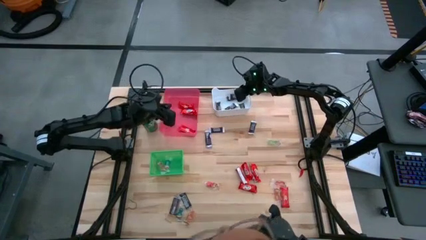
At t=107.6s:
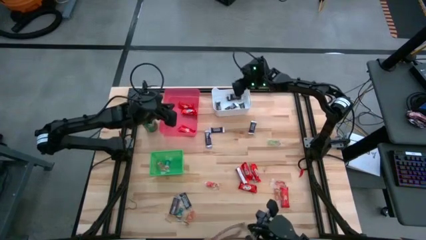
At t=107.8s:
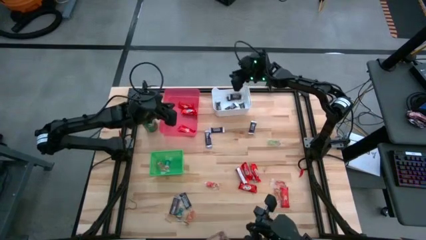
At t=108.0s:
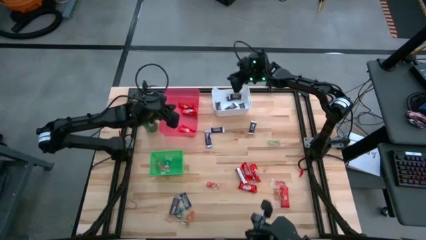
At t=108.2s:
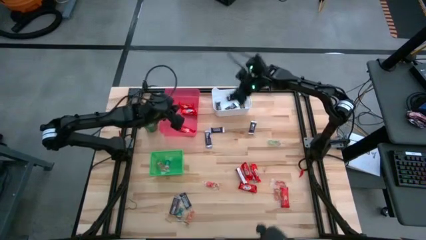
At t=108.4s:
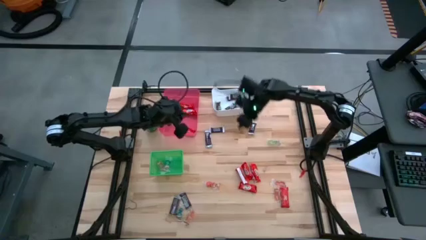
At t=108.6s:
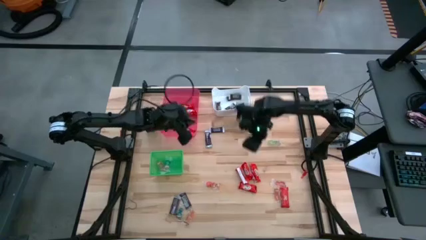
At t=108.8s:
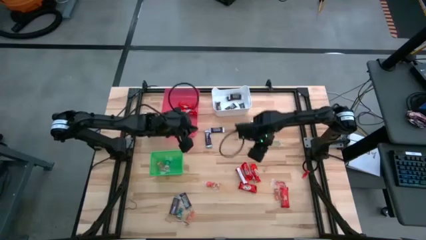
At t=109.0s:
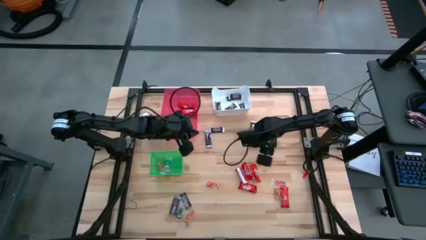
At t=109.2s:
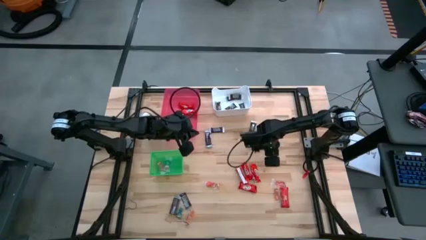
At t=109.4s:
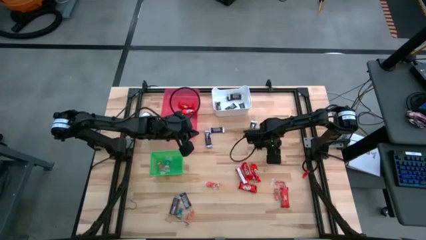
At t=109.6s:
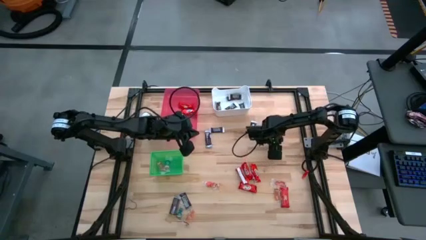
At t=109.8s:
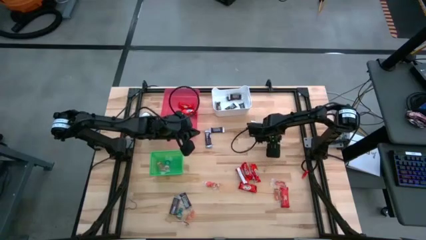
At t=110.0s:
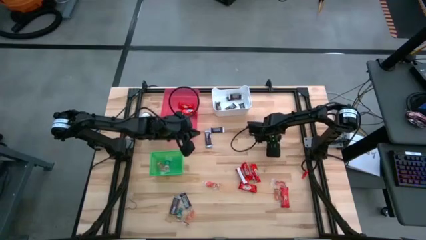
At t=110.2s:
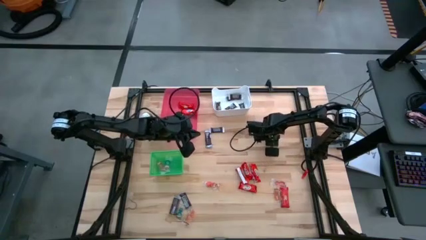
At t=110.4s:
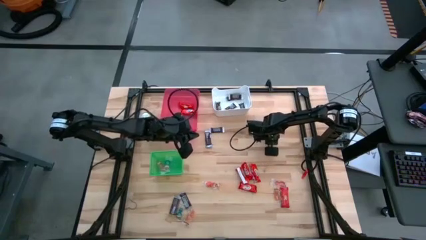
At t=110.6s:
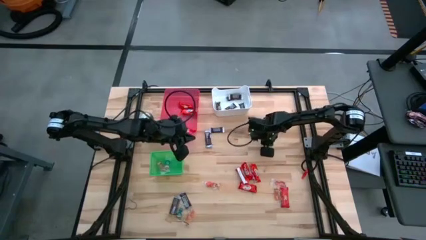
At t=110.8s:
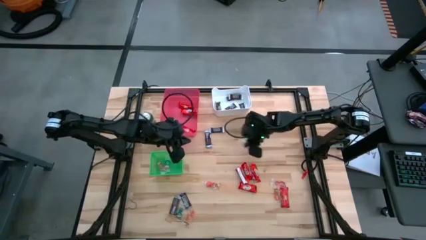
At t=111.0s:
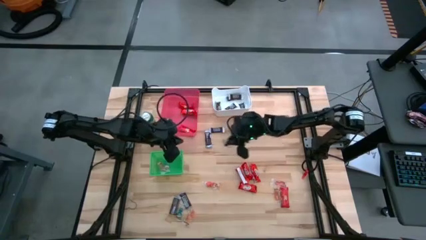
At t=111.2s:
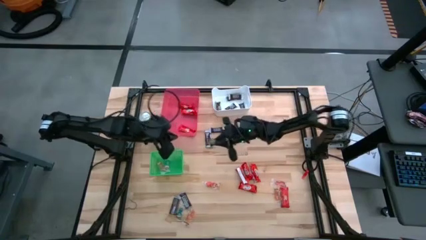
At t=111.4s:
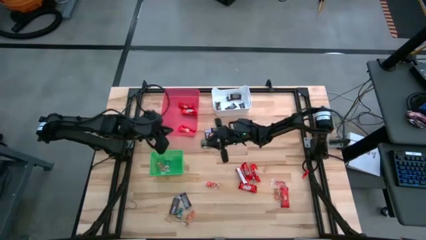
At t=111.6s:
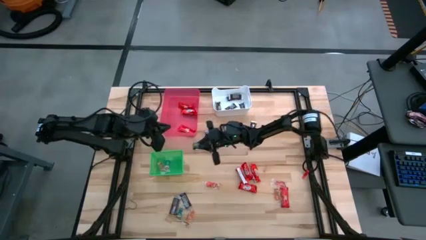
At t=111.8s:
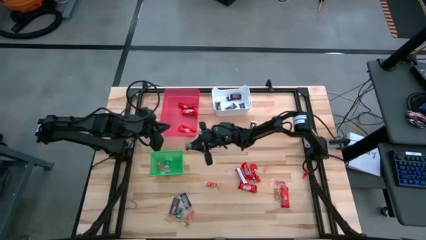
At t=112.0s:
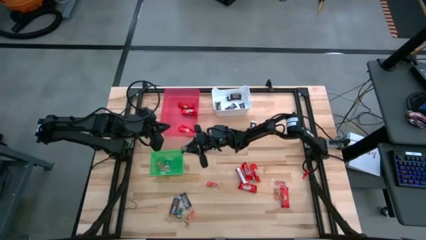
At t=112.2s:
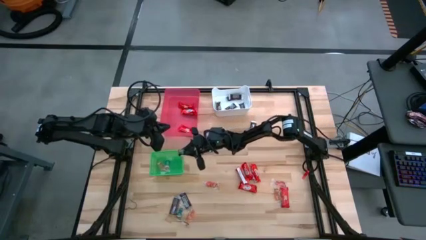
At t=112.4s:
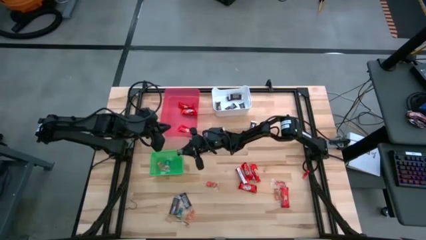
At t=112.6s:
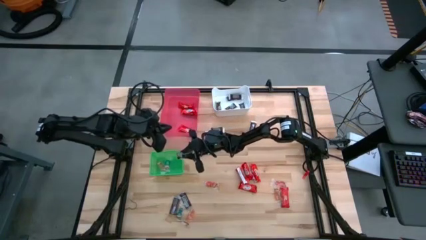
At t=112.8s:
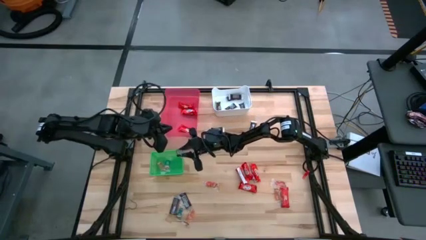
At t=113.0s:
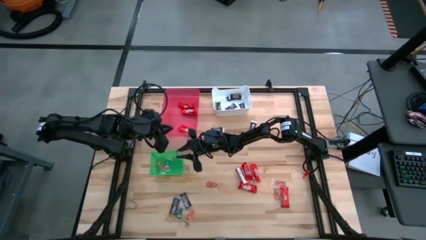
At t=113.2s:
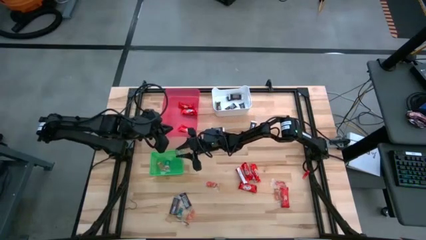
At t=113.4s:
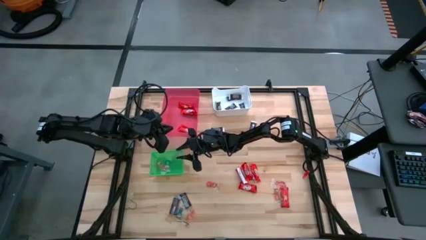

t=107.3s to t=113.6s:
Task: Organize candy in baskets
Put the green gummy into the green bin

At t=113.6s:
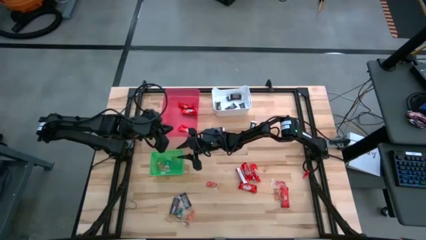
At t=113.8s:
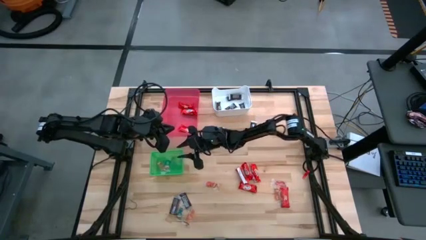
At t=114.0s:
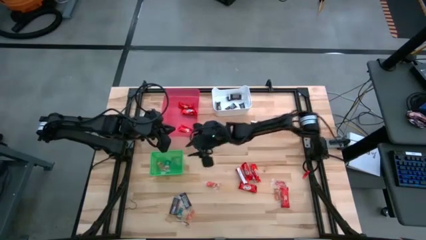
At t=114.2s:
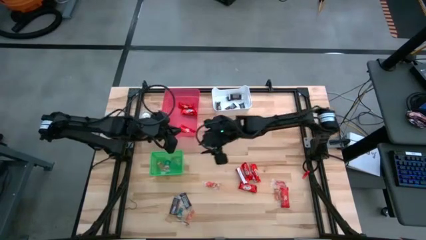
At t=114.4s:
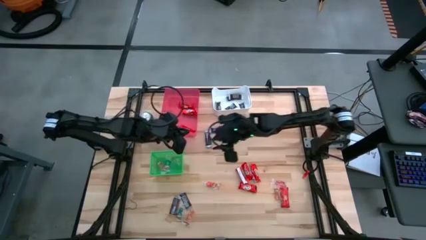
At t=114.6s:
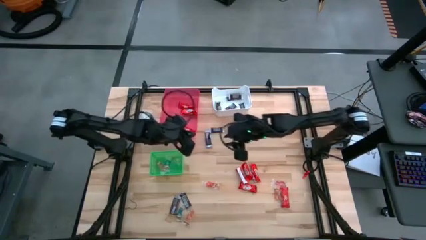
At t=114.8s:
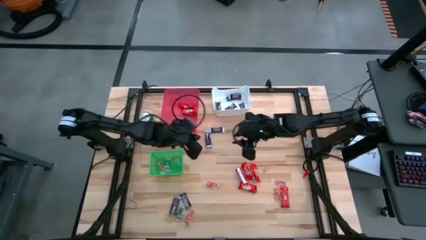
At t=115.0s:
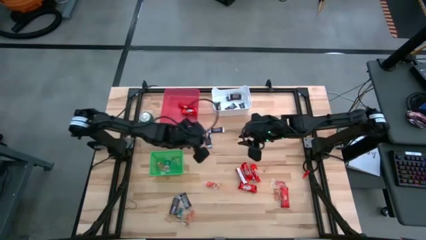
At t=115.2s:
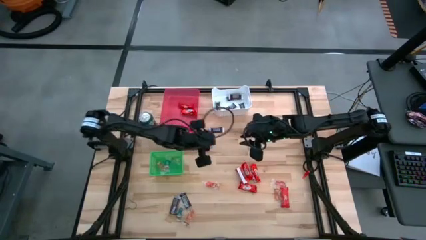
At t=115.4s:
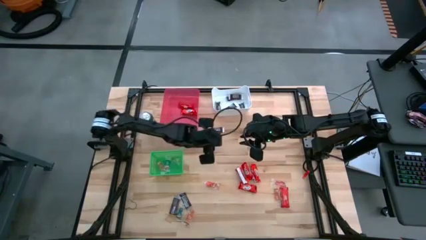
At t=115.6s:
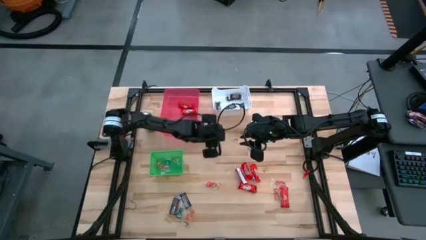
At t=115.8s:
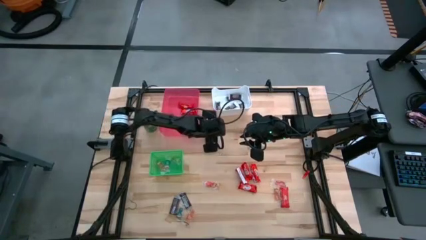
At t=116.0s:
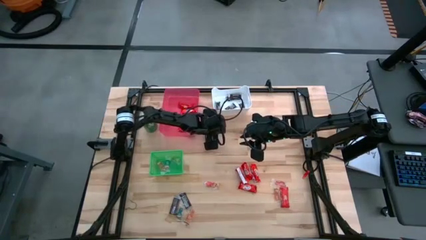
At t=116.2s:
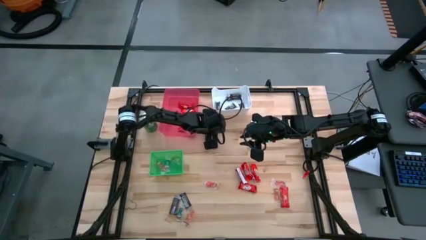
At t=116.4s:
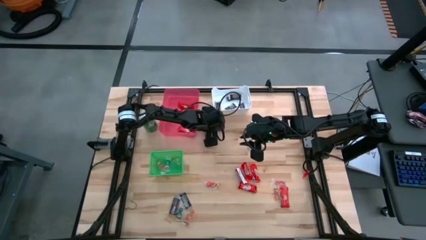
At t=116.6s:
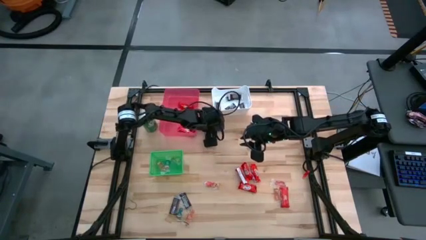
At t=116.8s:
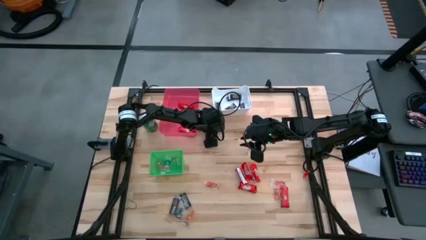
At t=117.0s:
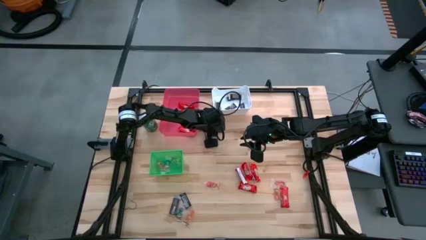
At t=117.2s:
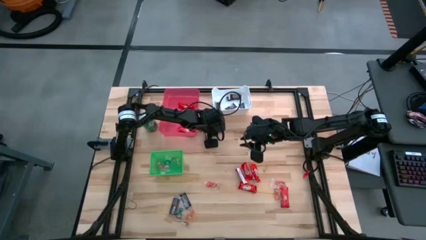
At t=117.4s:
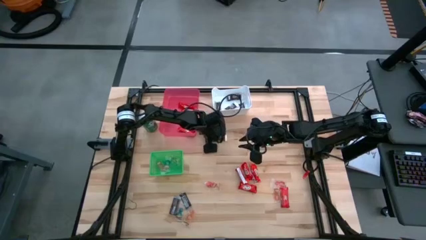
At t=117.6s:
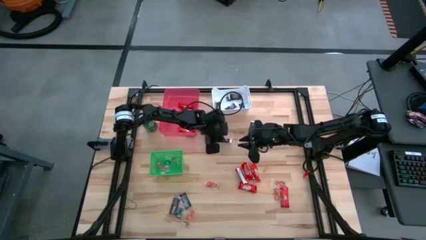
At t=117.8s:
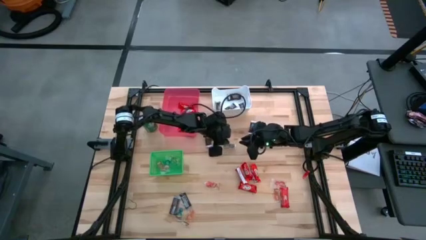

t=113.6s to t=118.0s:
Put the brown chocolate into the white bin

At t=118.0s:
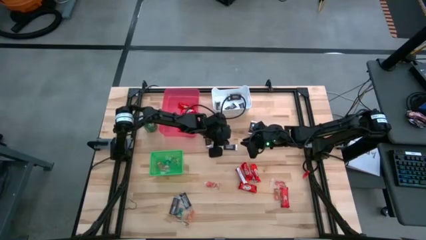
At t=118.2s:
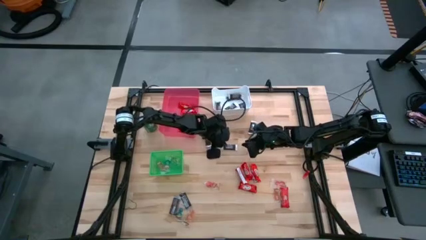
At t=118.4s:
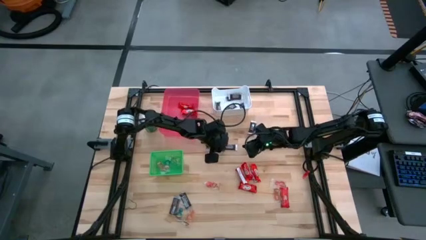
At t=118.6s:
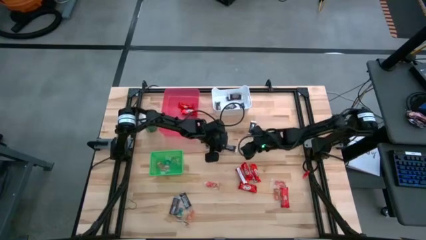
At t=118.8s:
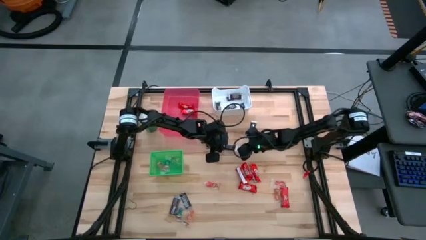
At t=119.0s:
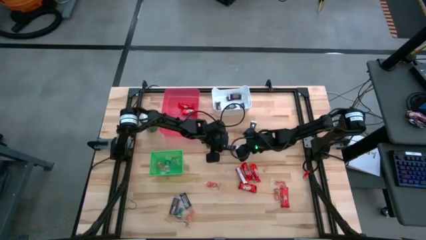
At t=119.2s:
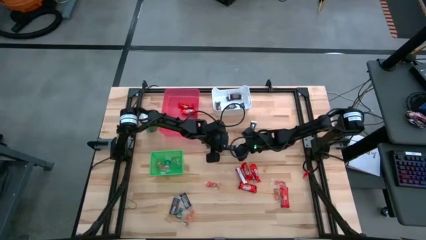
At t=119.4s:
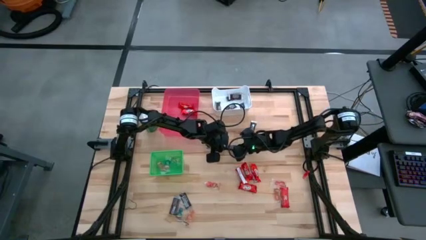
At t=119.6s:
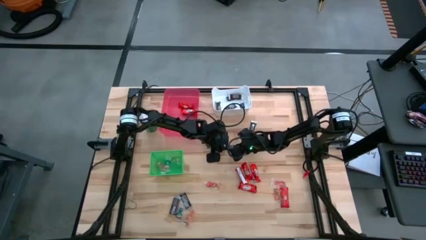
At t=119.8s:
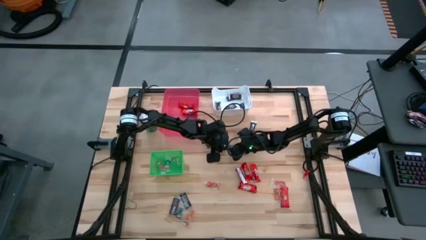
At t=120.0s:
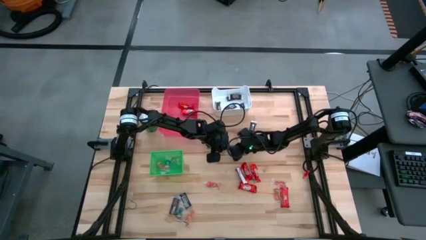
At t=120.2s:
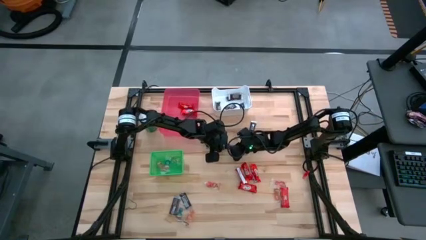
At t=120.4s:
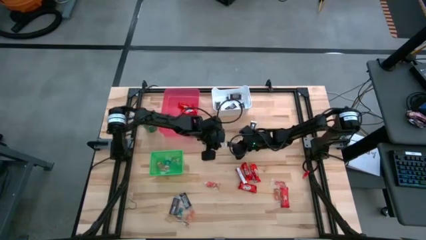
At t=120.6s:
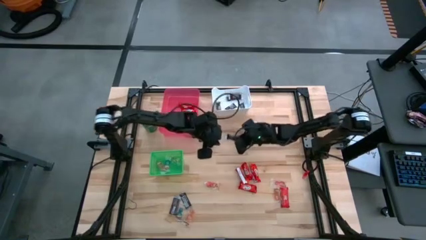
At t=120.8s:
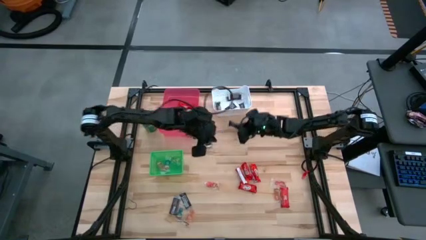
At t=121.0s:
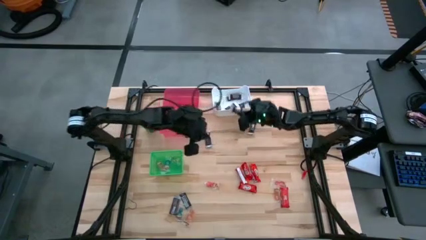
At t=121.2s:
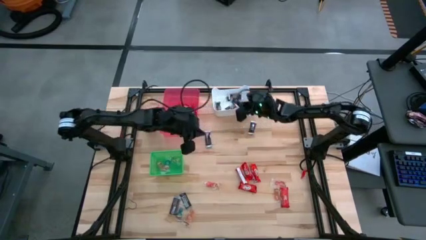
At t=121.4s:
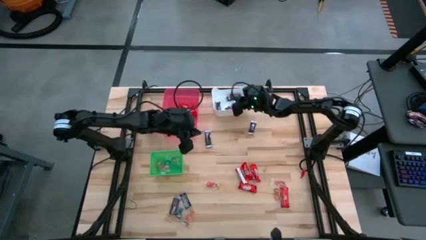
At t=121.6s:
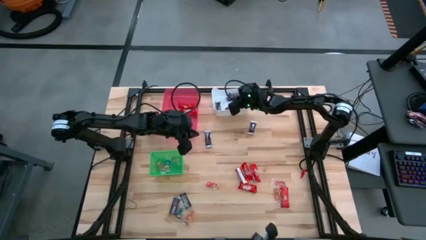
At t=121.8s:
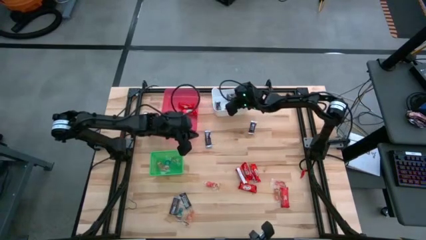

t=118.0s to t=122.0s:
Put the brown chocolate into the white bin
